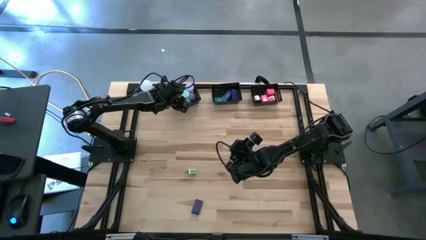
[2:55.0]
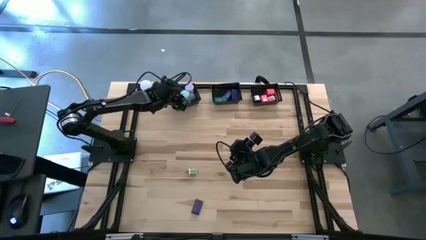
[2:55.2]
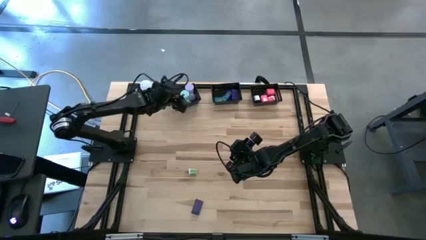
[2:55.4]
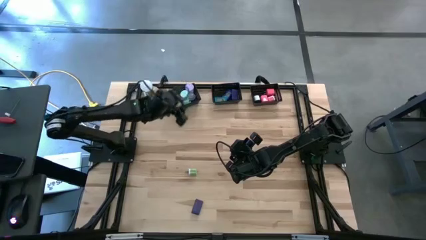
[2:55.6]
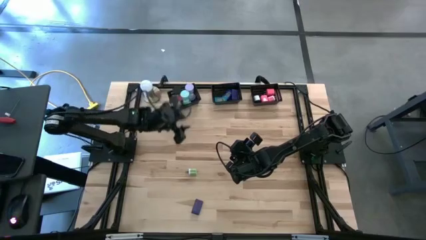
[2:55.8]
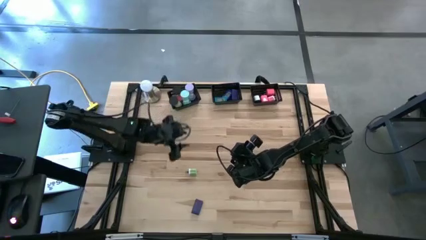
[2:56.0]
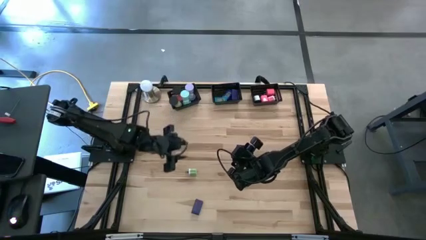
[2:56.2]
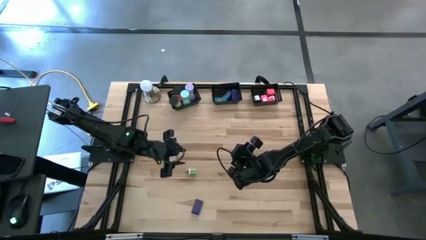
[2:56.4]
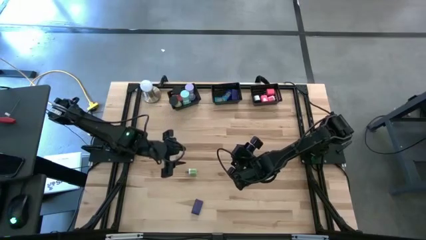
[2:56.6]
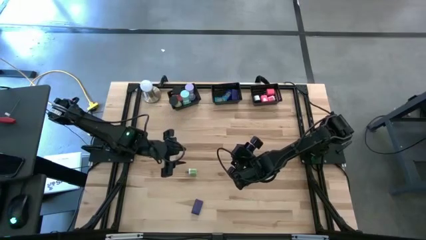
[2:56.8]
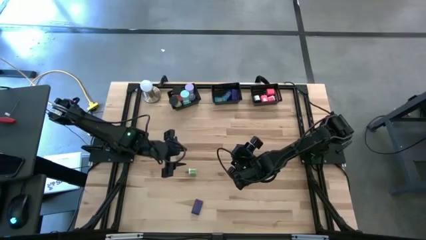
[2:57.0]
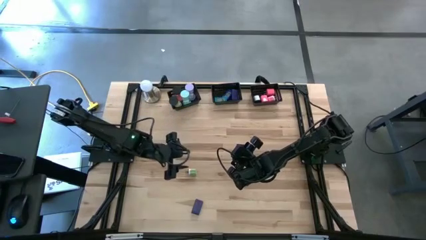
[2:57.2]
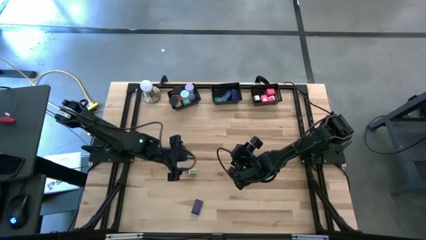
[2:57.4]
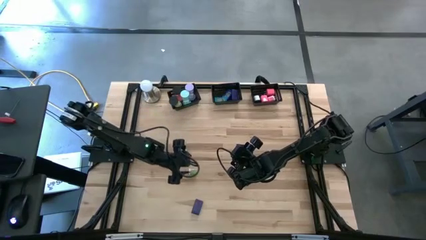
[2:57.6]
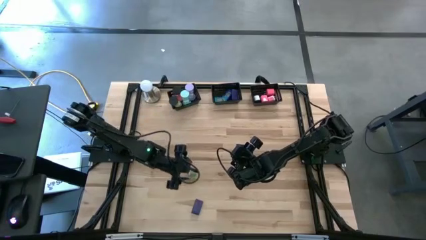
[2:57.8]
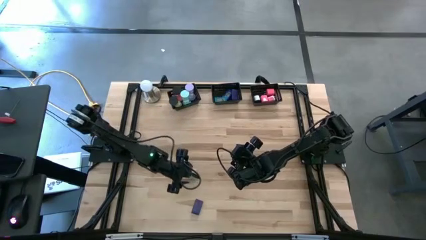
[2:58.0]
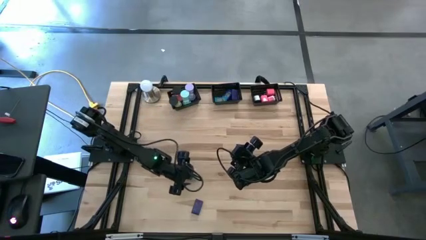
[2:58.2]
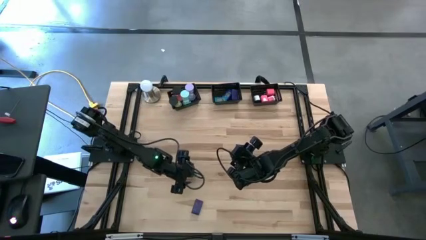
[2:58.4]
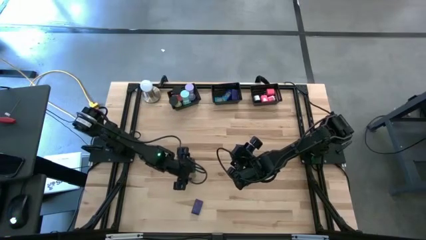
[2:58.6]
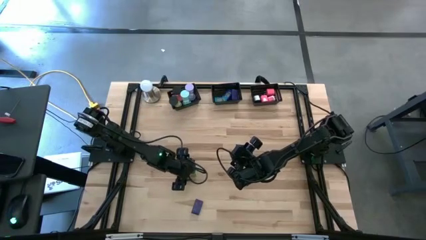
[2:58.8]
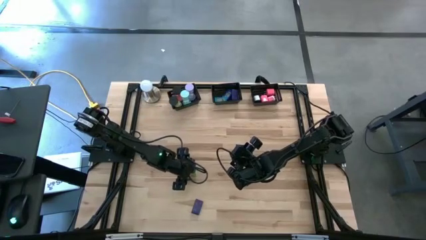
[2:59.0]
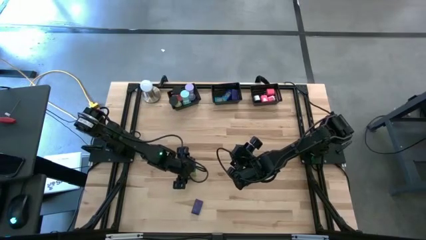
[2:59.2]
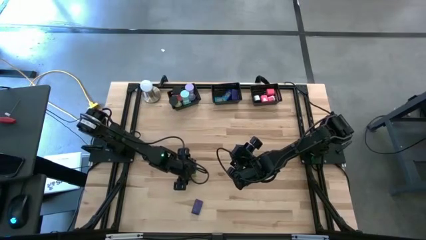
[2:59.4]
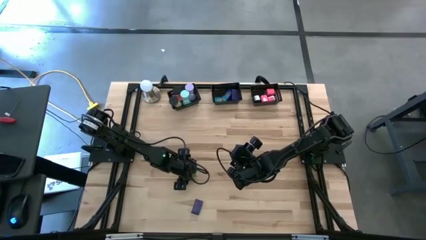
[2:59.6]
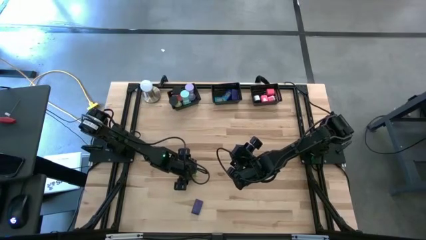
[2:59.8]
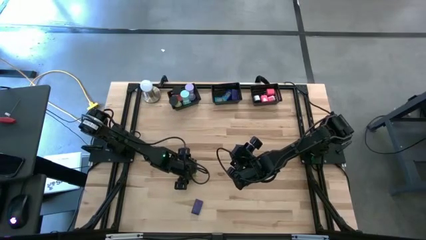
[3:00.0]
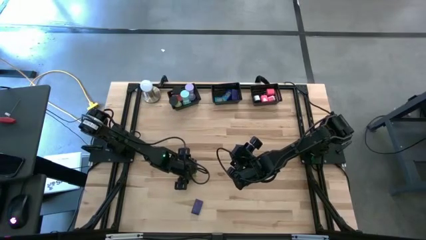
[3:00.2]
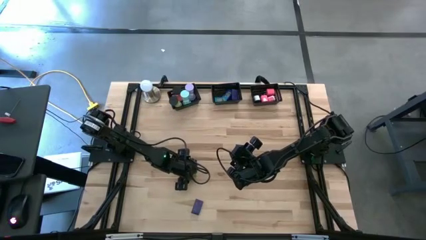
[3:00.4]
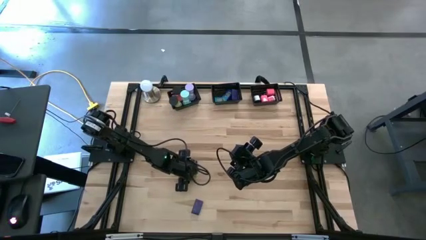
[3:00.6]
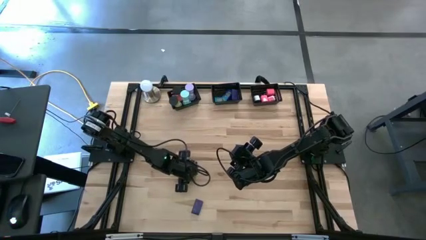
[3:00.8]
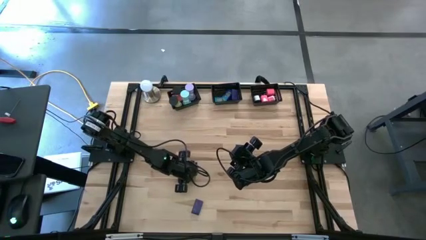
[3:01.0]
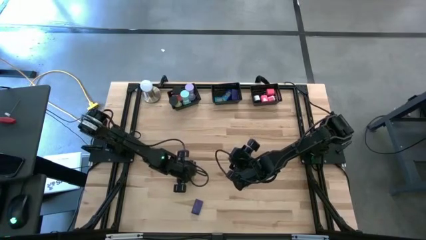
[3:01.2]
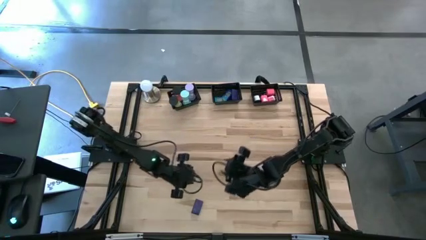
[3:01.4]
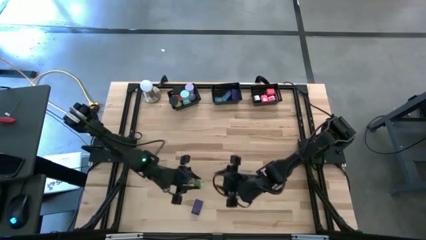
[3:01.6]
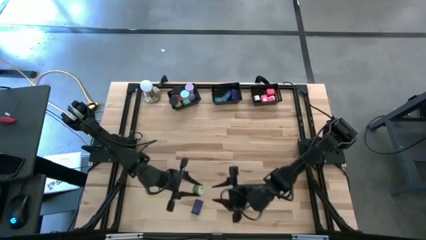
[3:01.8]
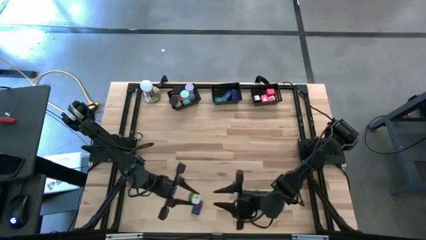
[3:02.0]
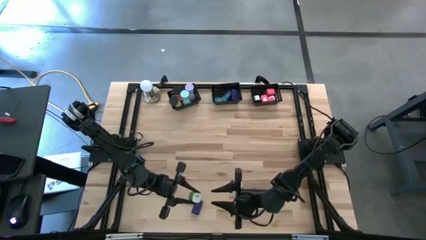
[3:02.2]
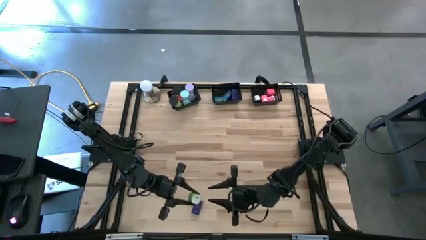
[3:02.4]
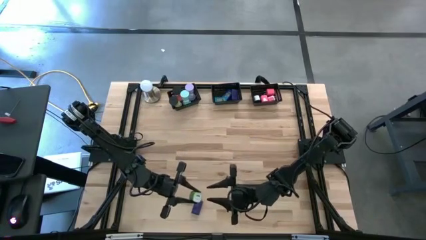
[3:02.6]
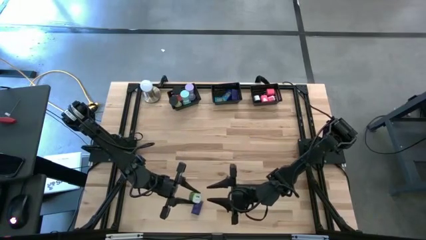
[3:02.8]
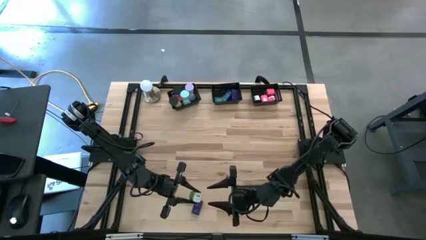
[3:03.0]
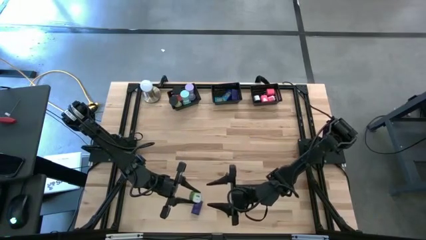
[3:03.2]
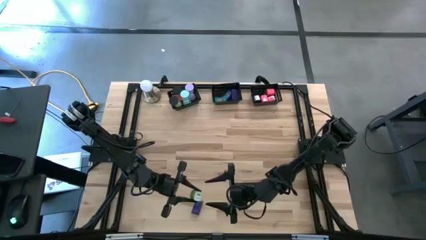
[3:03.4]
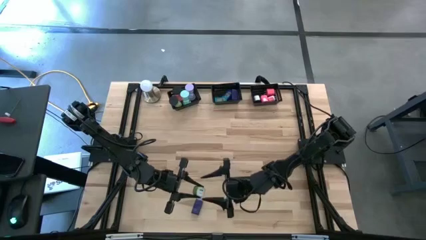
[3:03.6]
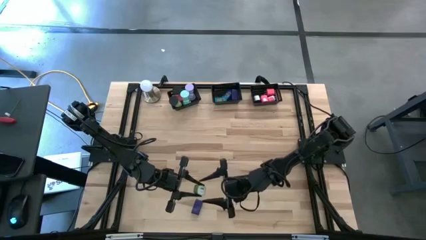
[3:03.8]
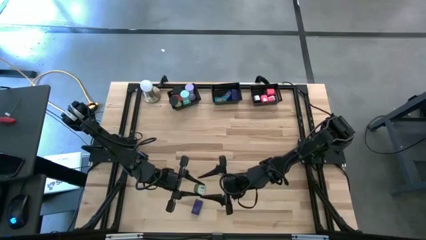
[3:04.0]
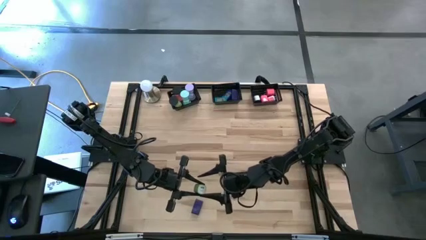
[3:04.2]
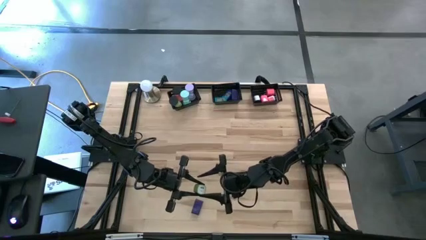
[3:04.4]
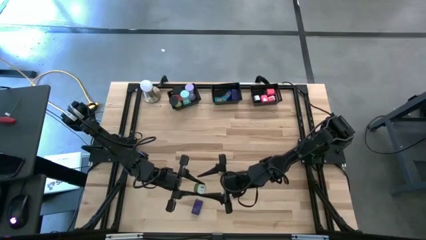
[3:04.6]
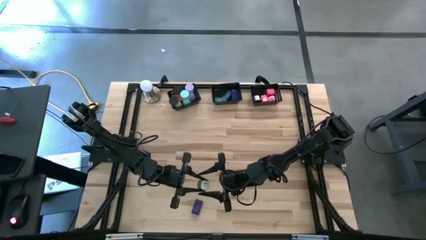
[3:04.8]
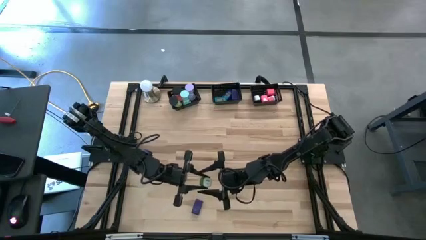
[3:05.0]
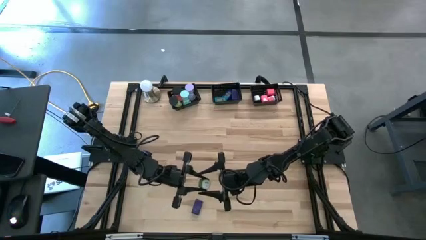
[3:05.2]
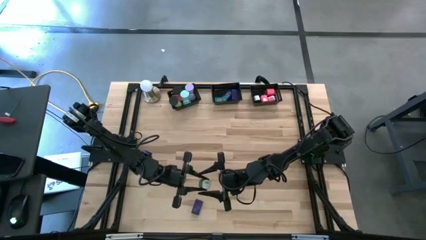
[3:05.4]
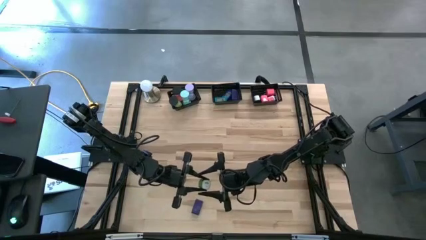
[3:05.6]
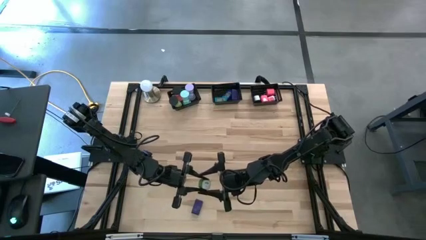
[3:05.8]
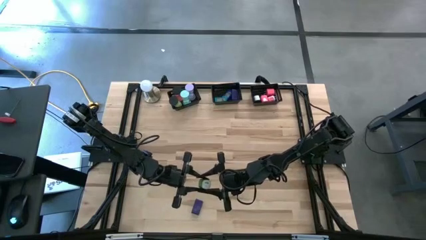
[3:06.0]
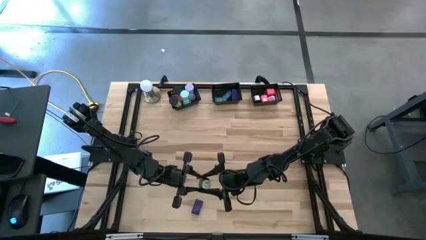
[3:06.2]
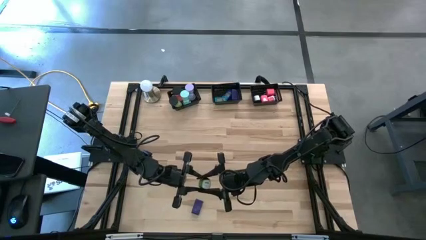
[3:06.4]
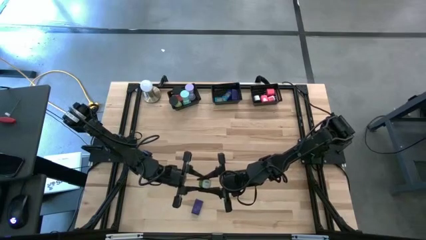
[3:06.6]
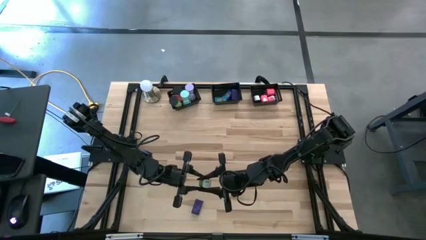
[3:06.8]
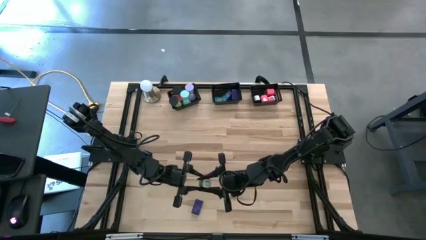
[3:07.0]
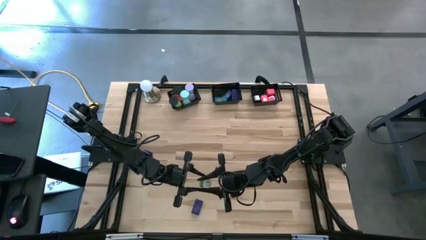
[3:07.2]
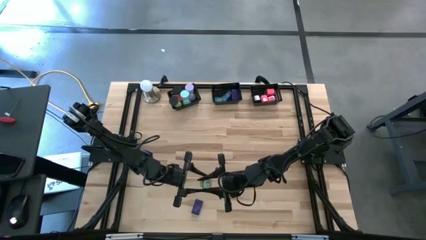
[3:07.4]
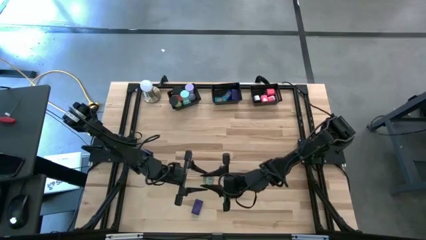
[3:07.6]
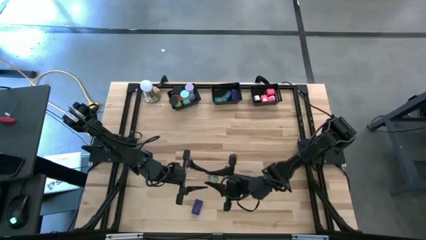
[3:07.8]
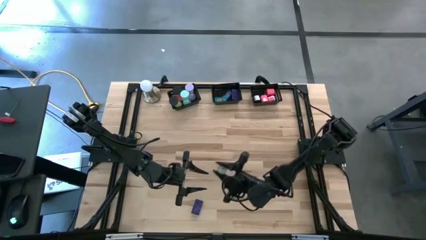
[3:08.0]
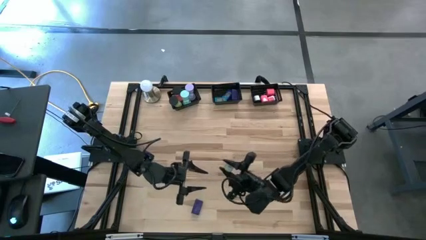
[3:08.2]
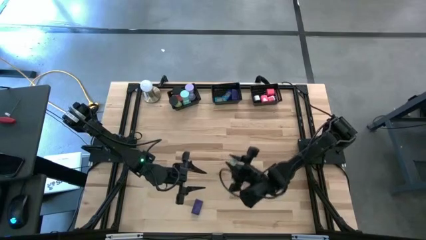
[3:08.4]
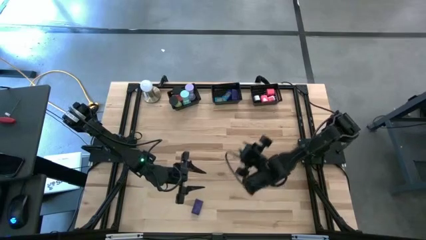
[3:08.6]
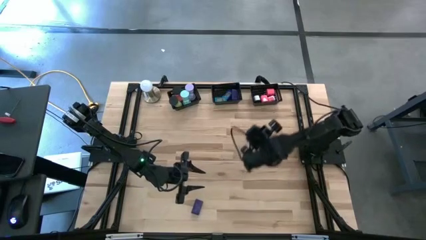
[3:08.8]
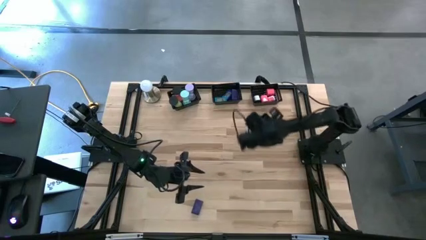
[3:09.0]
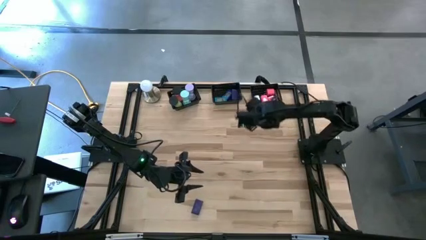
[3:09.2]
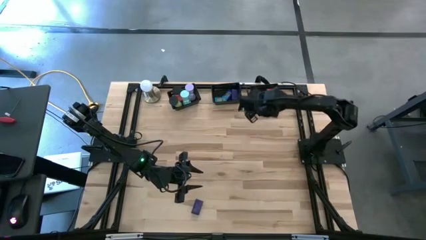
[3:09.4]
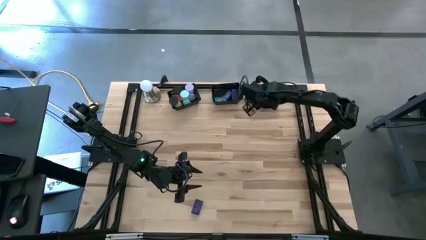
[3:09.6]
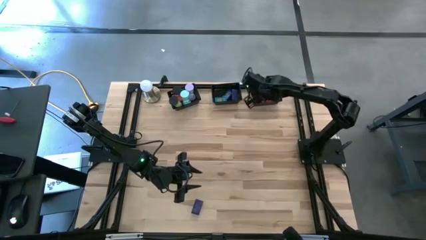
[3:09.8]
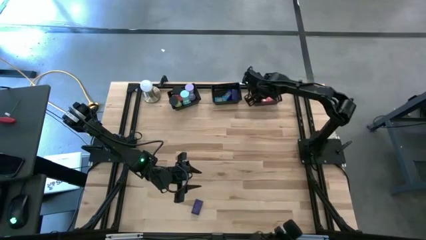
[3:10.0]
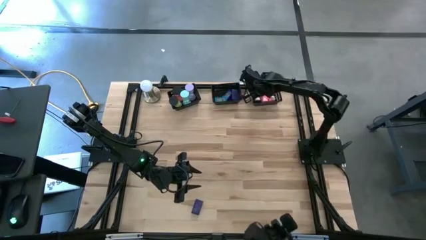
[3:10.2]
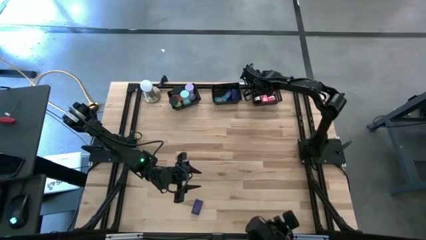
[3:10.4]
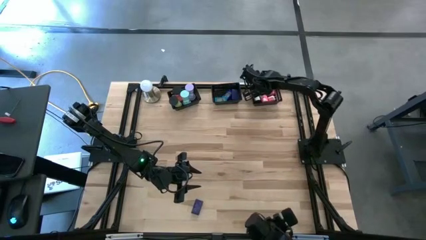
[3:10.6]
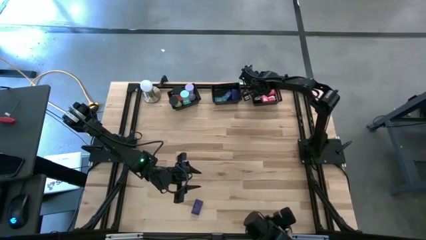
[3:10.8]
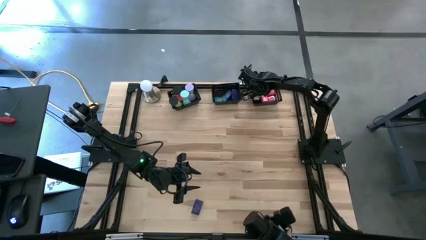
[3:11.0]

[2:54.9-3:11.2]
Task: Pick & Place Office items
Put the green white charger adapter into the right black bin
